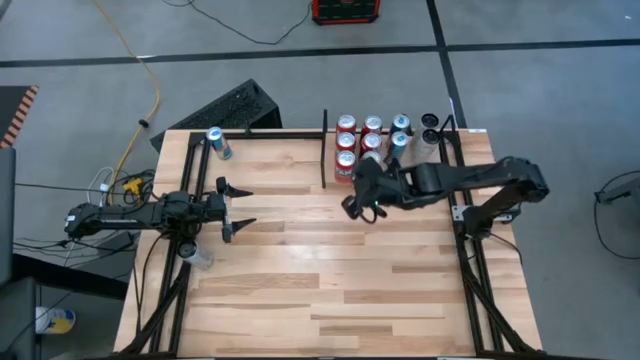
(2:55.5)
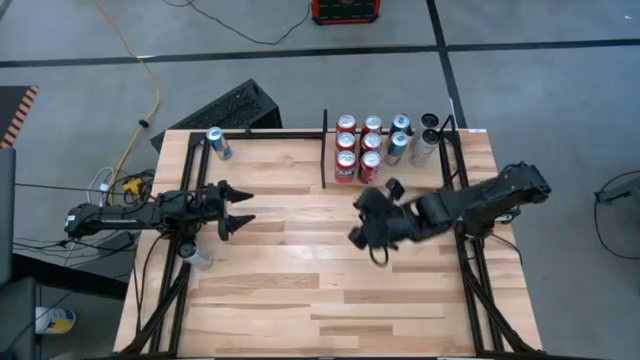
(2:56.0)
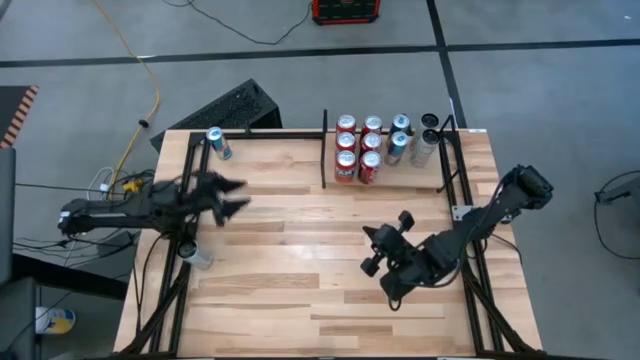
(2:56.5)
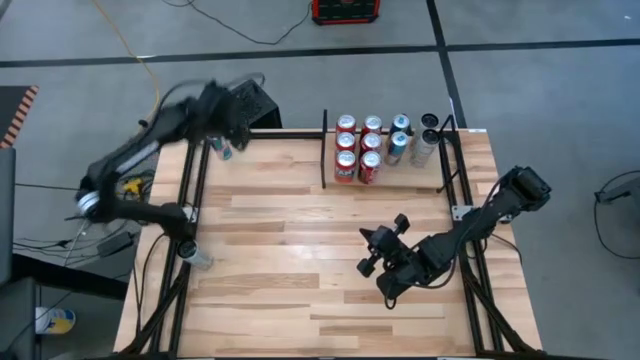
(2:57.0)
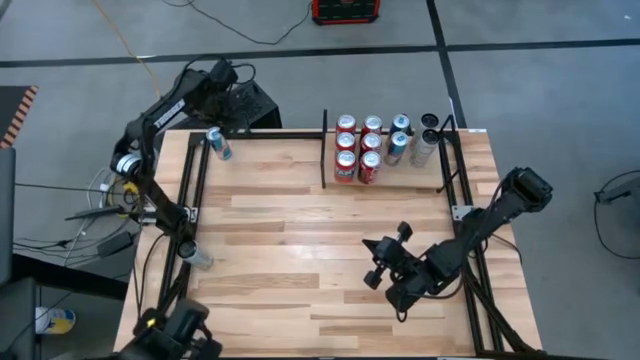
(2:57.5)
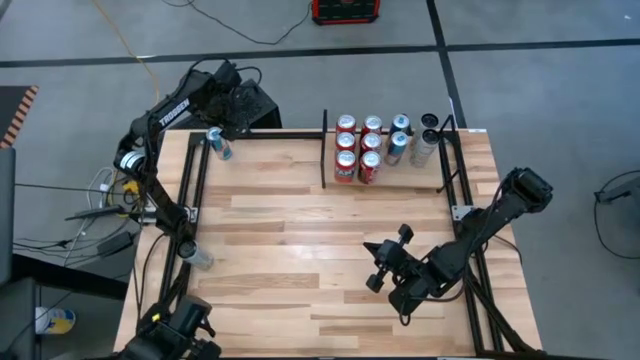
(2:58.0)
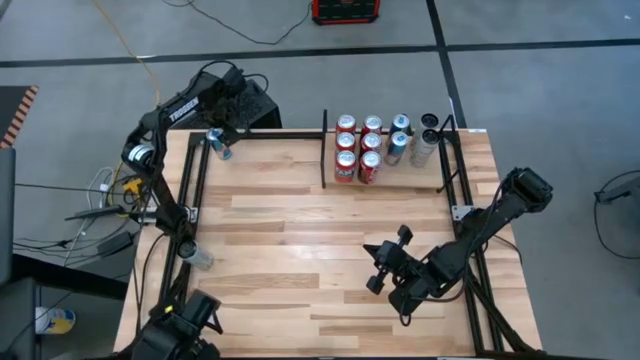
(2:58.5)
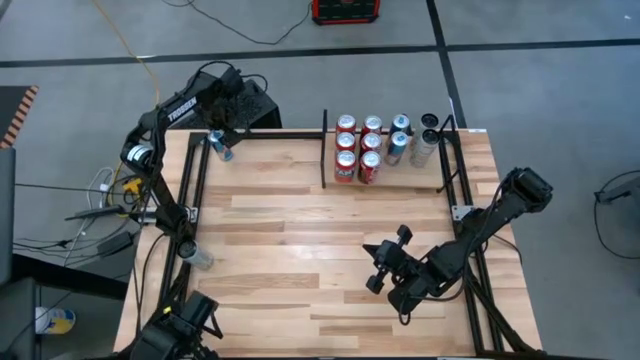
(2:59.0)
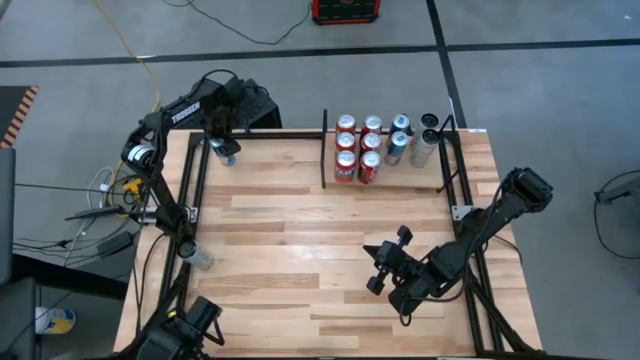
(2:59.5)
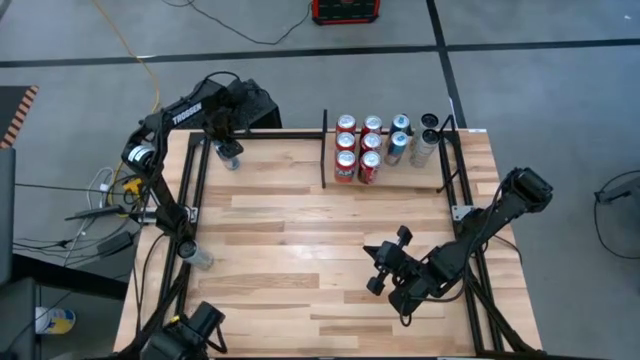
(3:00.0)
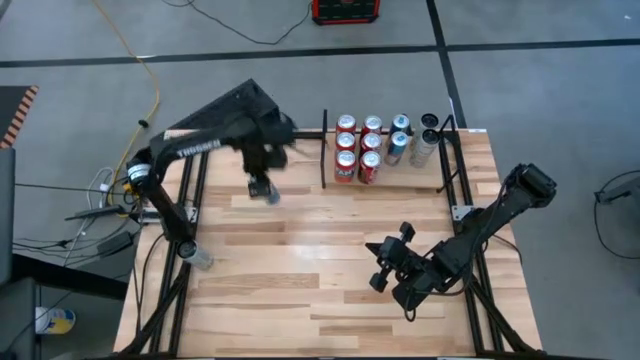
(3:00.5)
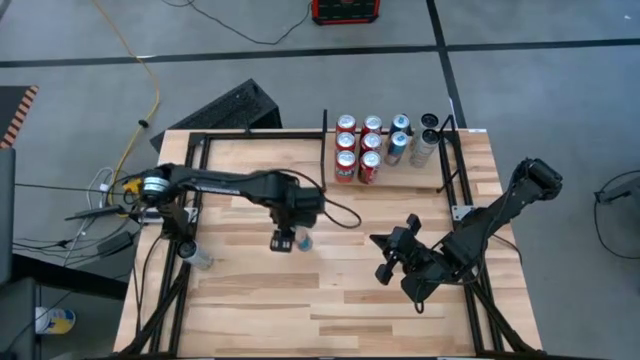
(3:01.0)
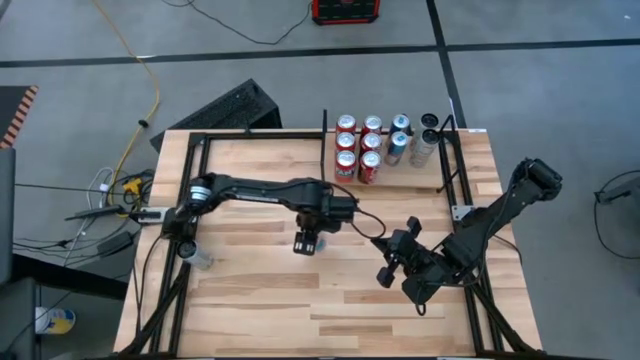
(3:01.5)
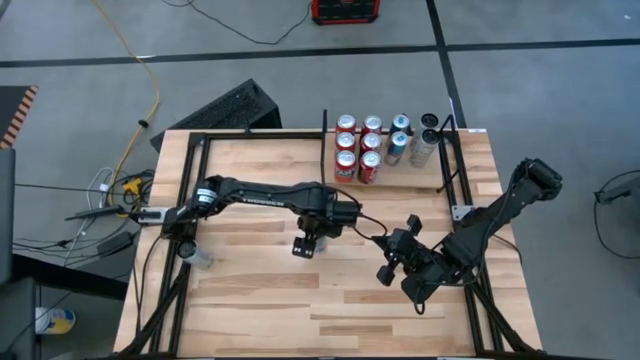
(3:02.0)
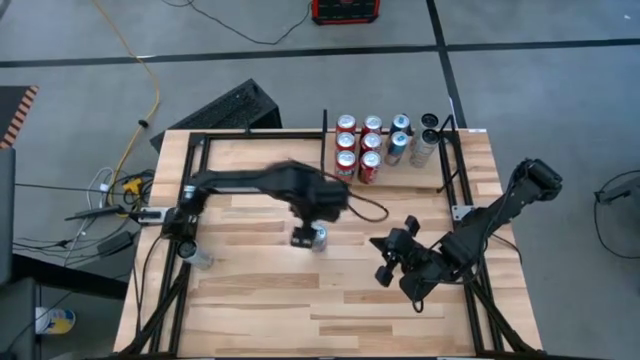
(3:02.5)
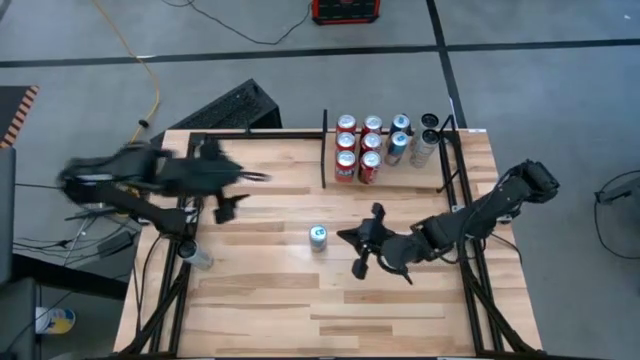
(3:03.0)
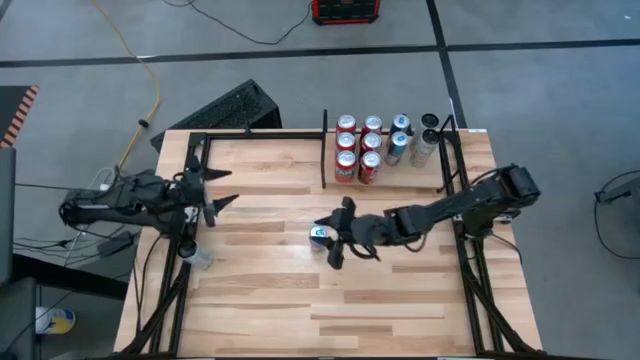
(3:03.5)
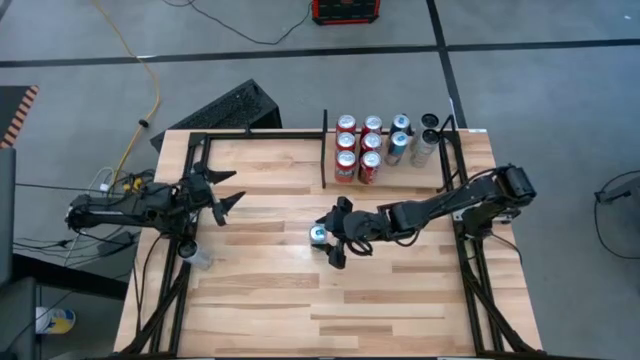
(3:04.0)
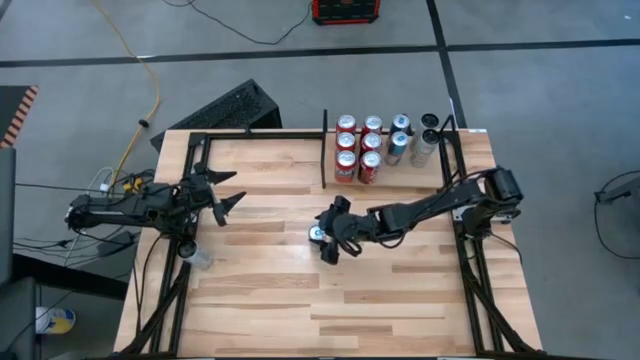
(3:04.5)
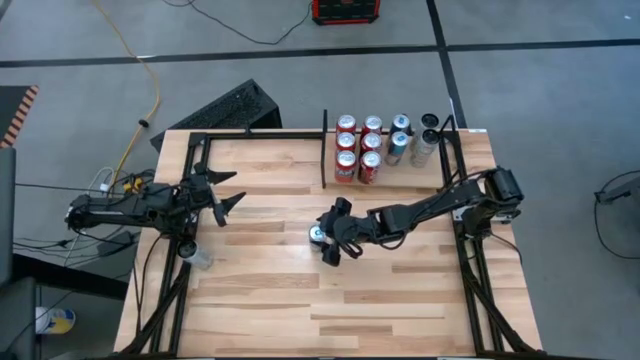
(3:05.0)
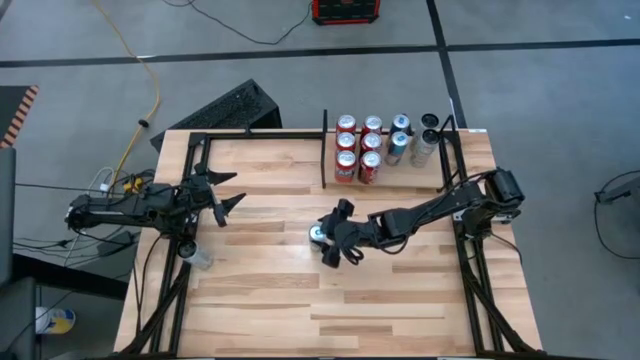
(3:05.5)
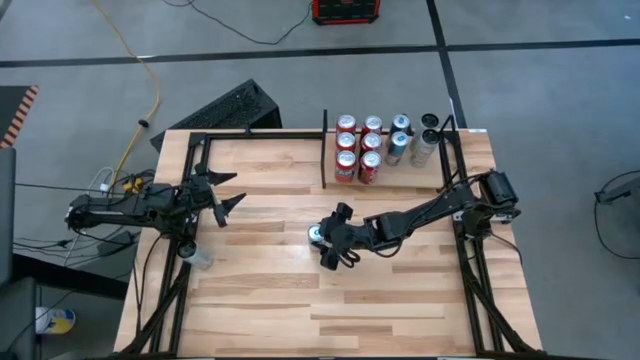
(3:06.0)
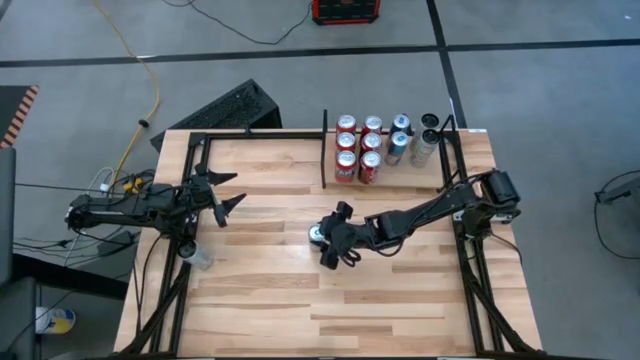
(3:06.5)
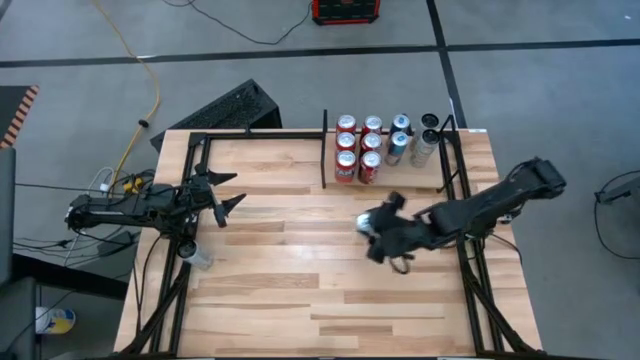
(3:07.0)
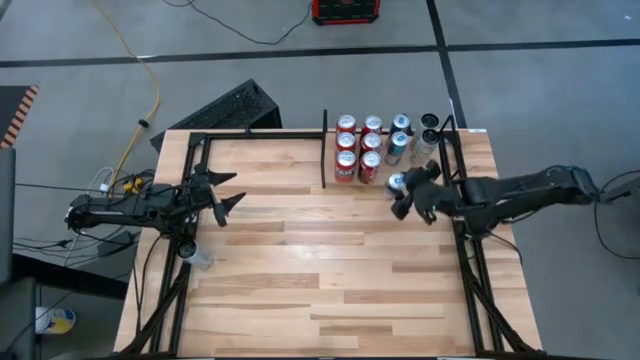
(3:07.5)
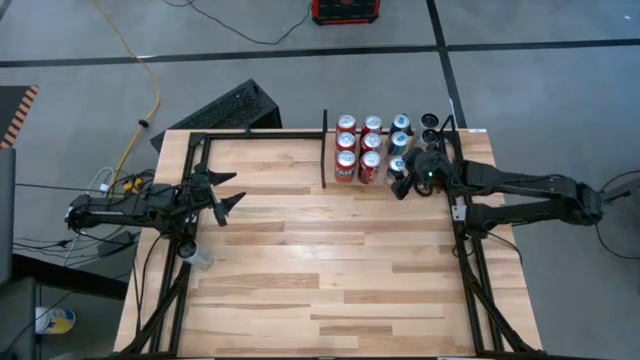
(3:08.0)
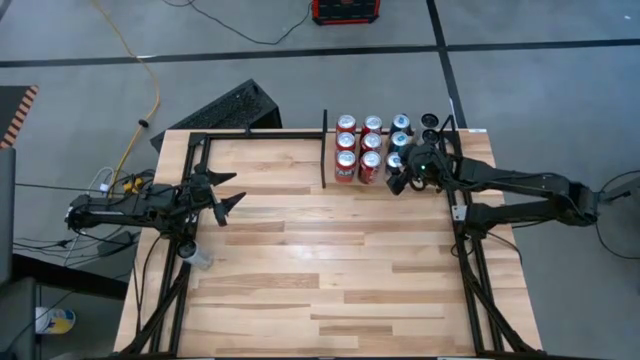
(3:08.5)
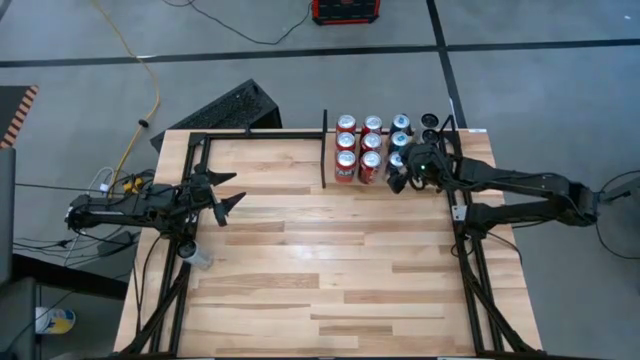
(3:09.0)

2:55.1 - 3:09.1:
Task: Place canned beverage on shelf
Put the blue soda can on the shelf aligned with the other blue soda cans

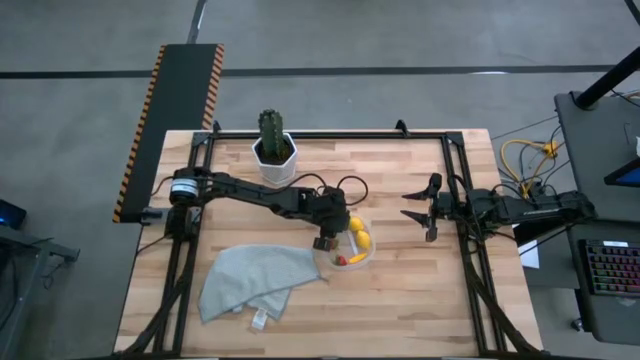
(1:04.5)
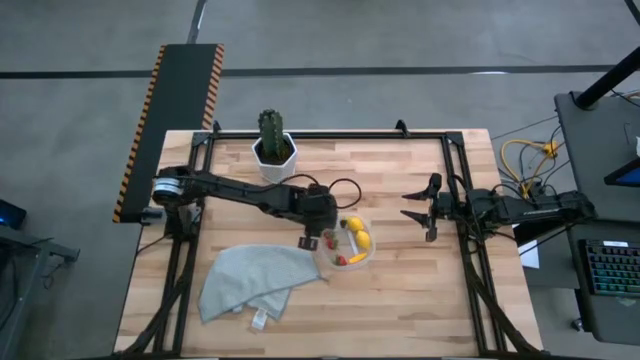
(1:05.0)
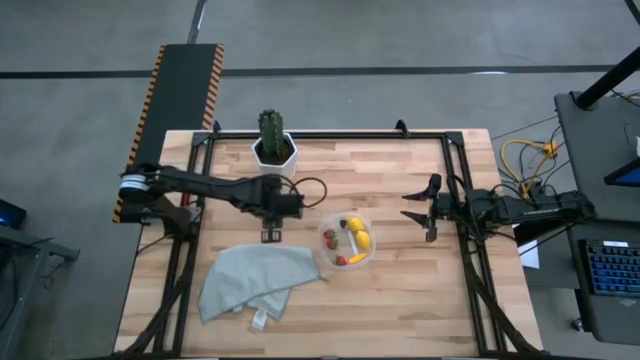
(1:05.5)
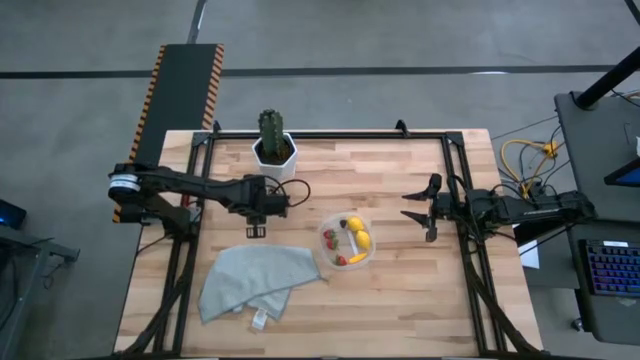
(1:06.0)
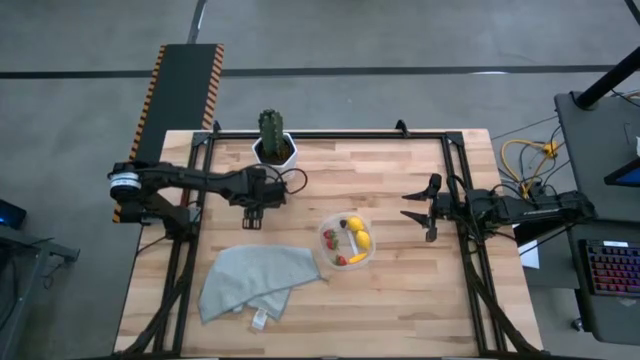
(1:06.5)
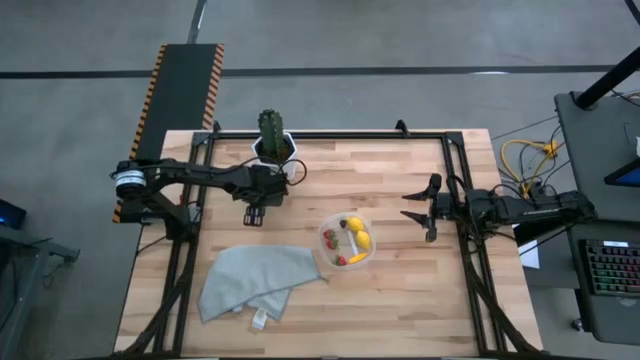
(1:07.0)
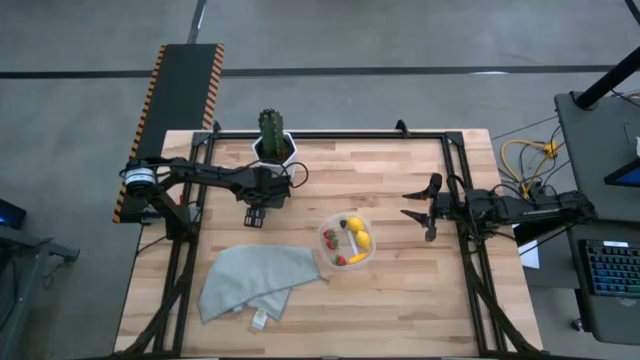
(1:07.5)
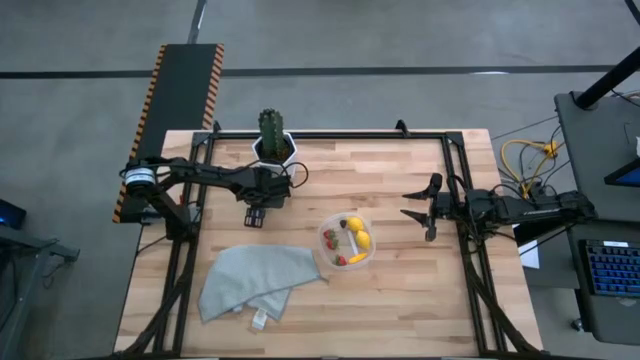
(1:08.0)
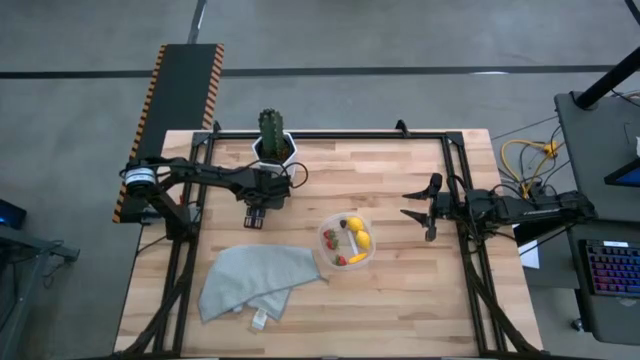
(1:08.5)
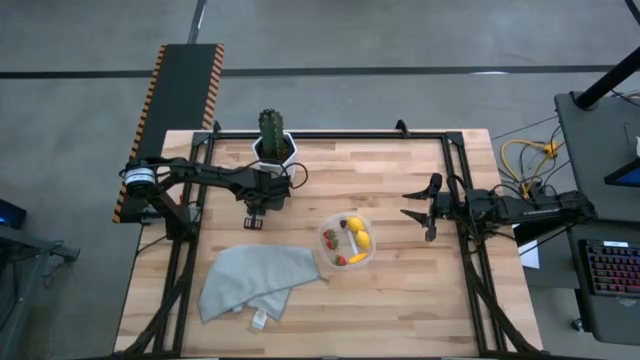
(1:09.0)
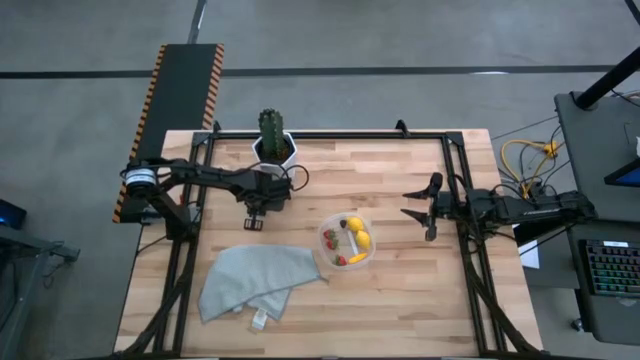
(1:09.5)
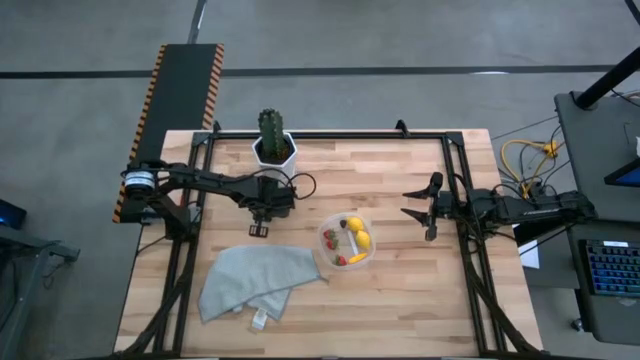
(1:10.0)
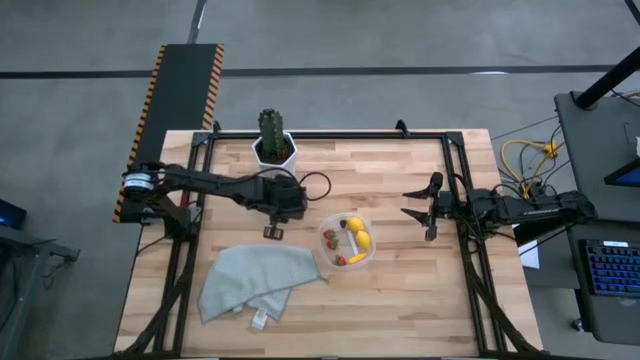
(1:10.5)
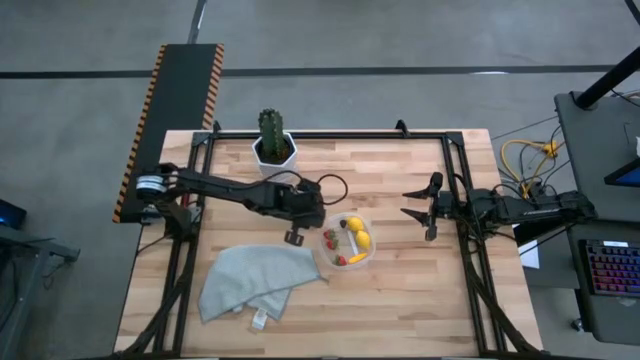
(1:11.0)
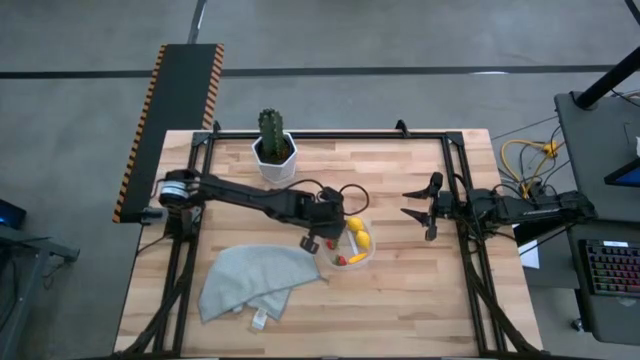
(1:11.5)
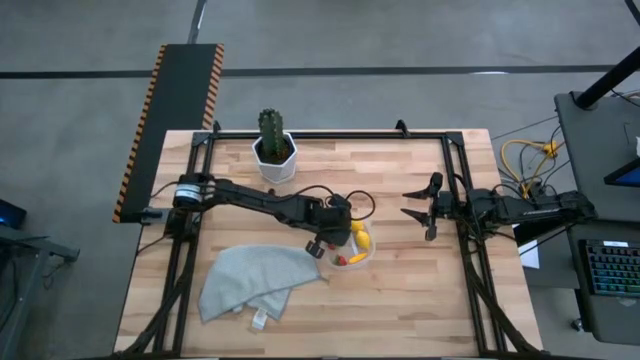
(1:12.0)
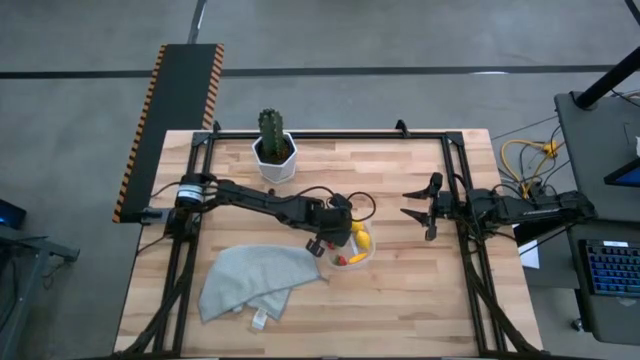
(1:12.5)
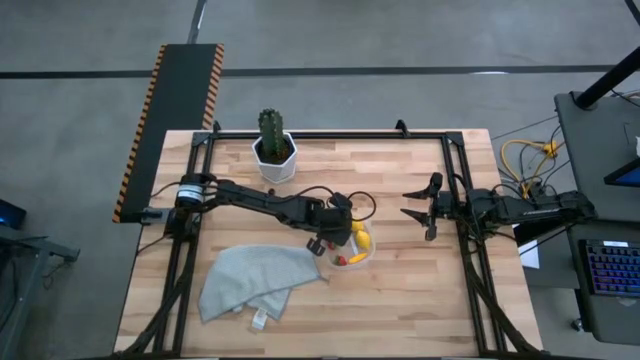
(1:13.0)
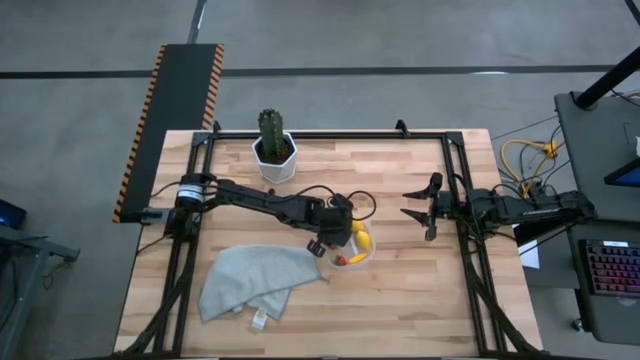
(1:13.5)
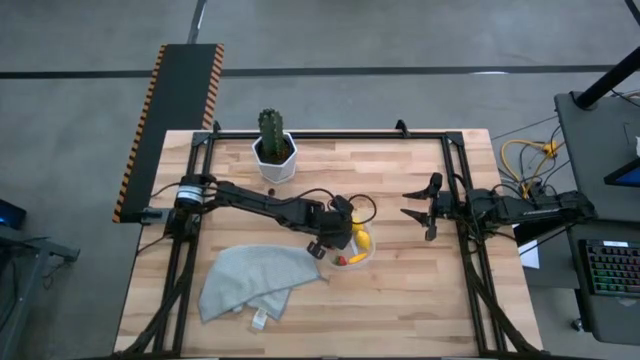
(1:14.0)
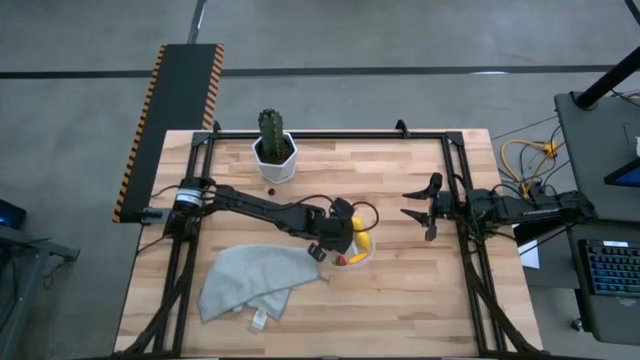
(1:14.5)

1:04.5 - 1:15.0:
Task: Pick and placing Produce into tupperware
Put the red cherry into the transparent container
